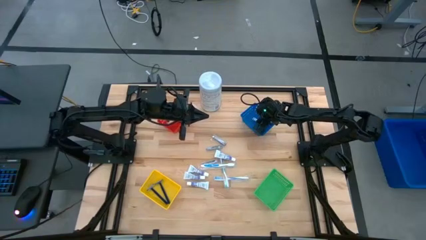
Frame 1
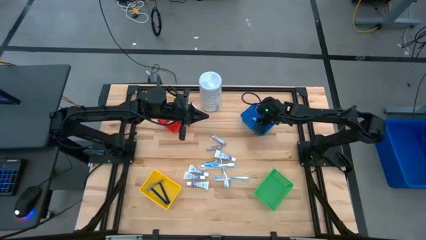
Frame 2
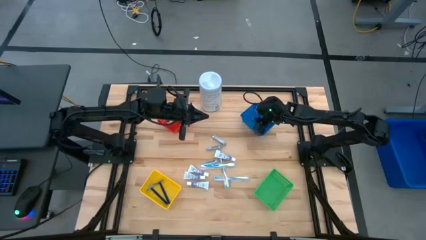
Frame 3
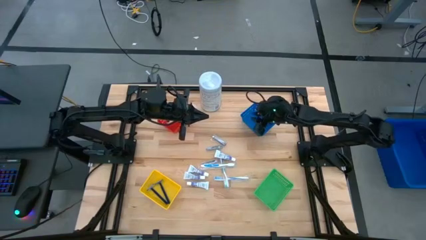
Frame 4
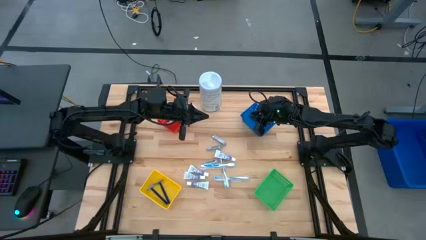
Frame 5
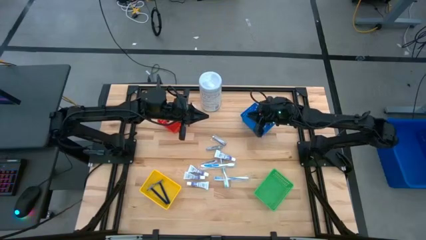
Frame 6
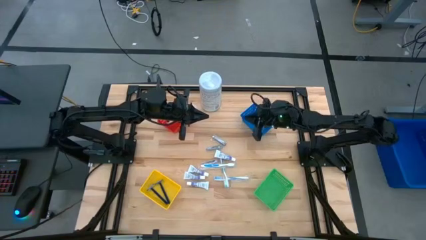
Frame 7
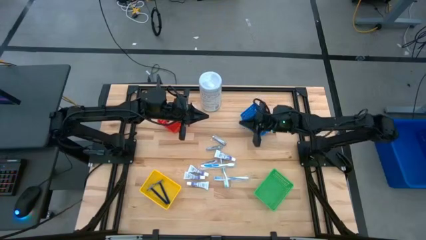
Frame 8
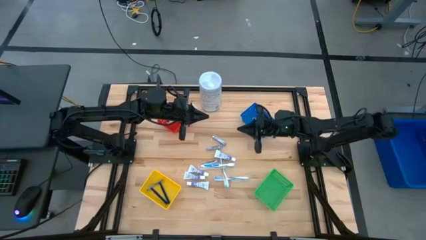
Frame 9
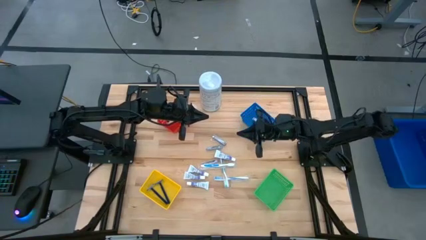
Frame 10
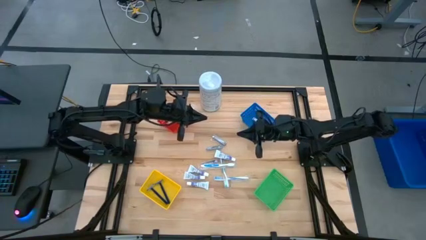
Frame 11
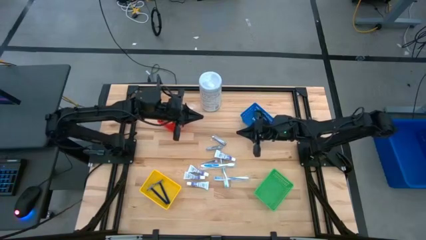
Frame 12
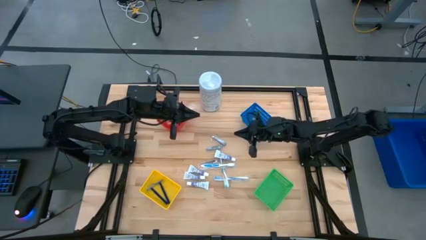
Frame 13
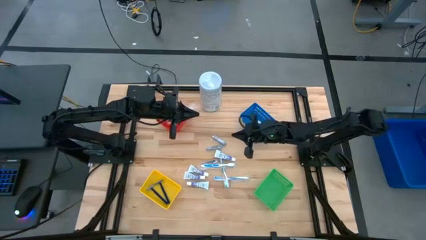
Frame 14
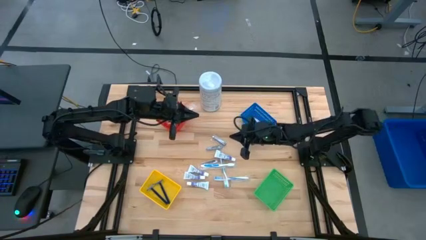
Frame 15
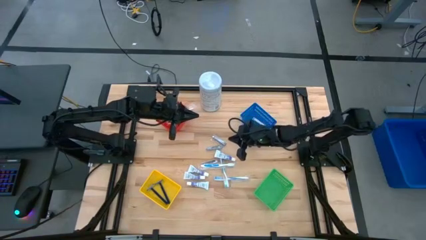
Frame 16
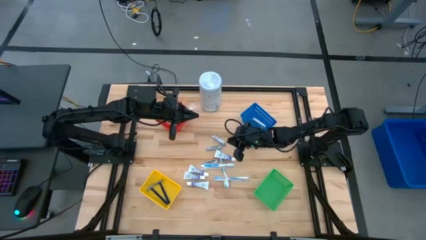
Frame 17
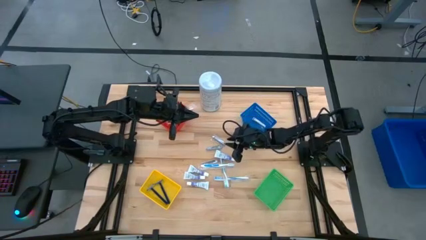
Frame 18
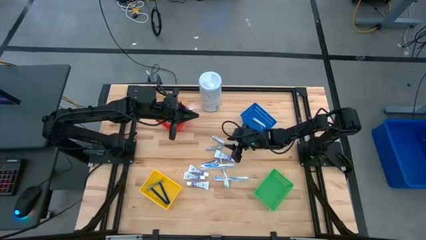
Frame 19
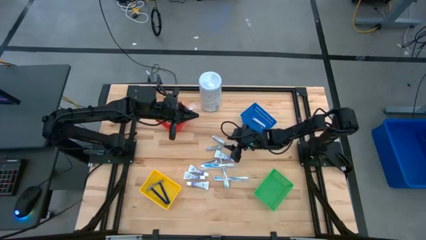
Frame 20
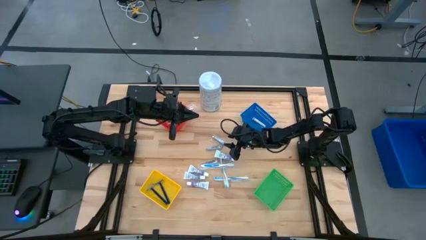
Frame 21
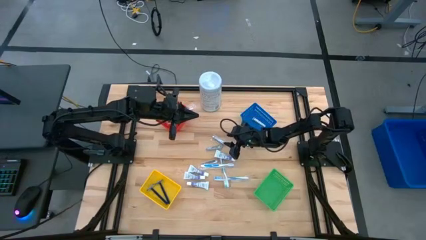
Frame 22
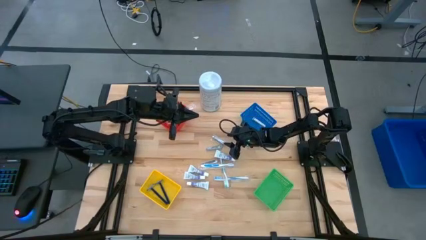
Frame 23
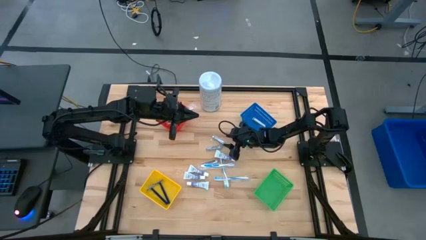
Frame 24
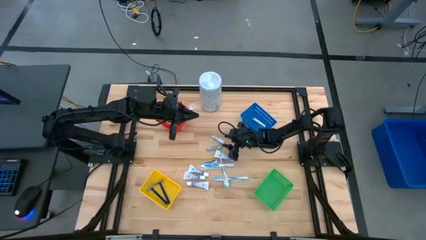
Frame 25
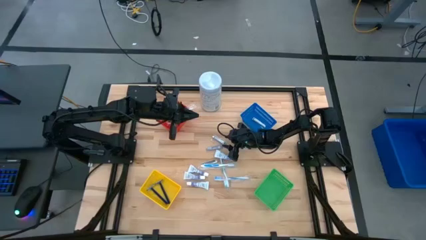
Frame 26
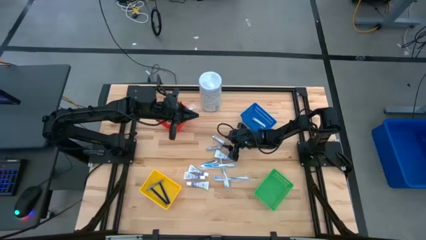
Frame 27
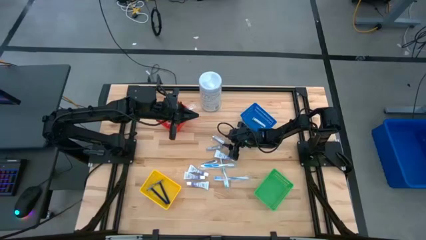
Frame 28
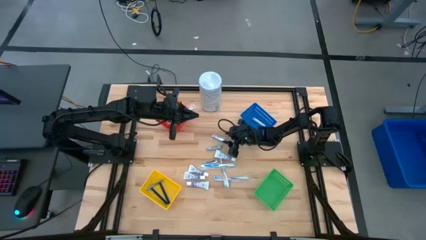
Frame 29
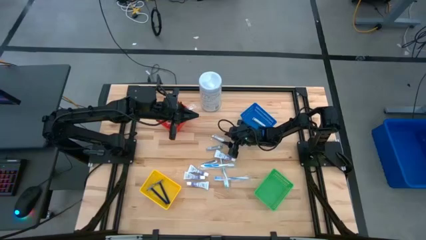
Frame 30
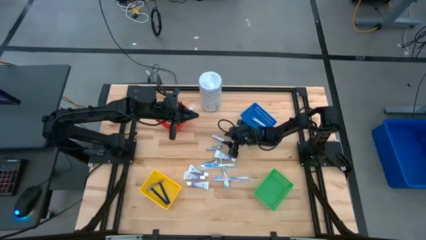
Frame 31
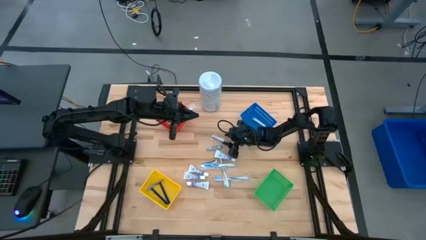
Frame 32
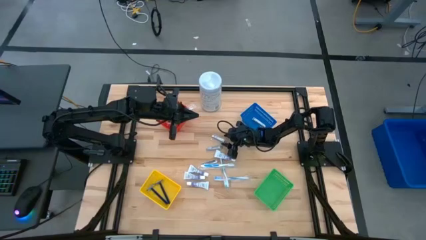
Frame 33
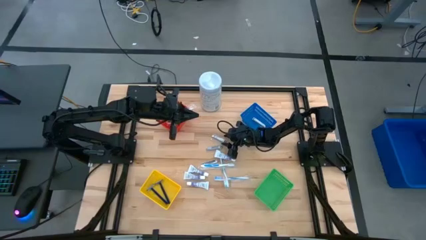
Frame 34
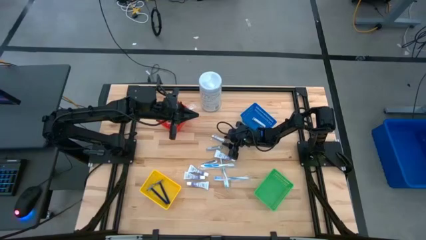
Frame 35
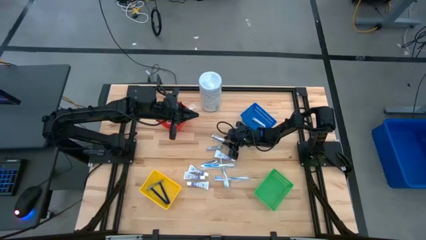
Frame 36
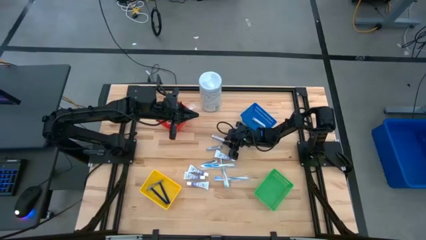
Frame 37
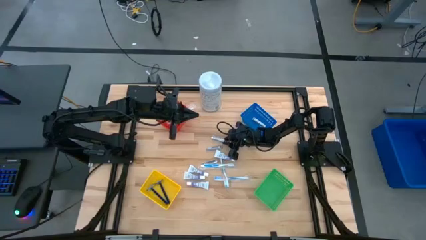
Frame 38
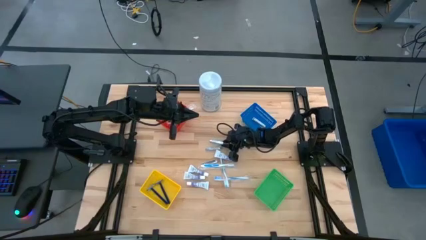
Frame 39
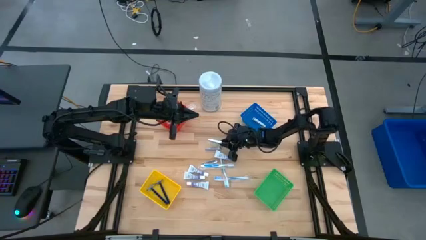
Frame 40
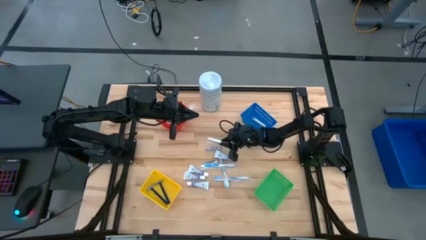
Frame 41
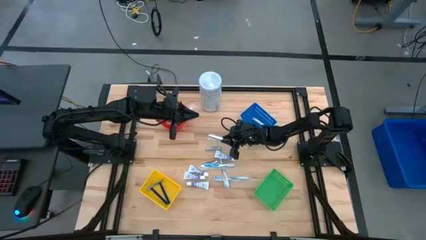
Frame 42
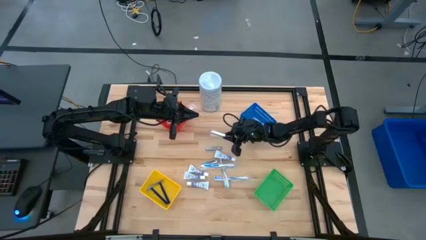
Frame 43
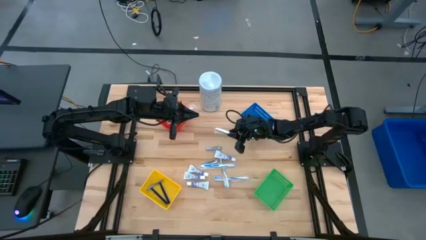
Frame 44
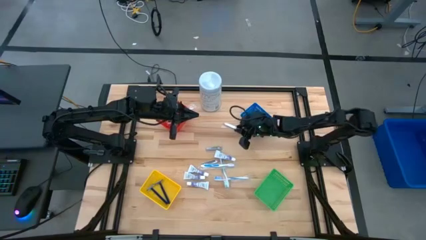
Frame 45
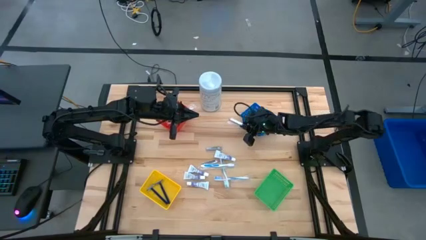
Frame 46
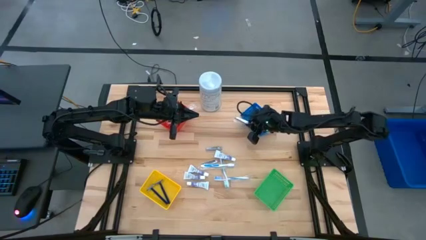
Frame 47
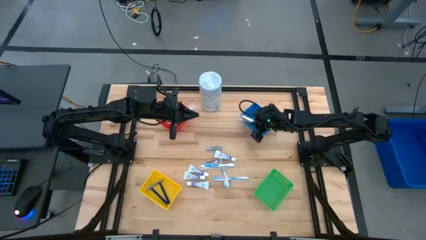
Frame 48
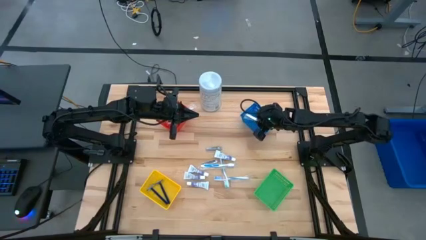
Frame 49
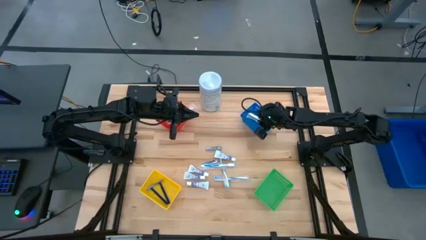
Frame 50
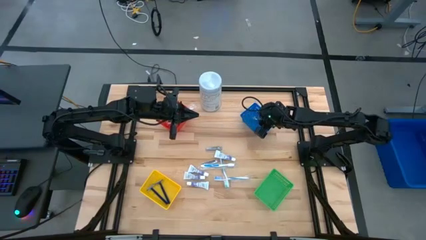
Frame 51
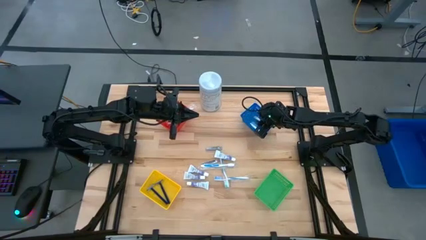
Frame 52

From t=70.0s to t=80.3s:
Task: Pick & Place Travel size toiletries
Put the silver nail clipper into the blue basket

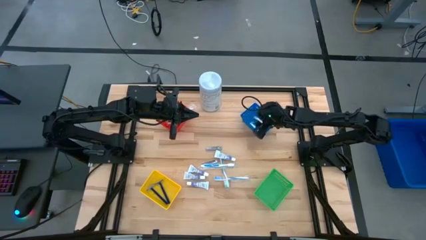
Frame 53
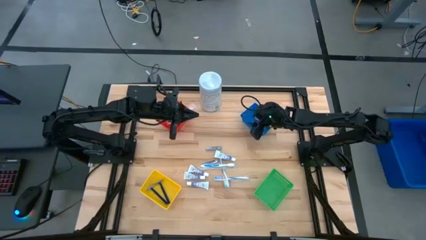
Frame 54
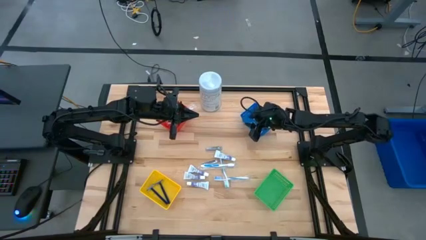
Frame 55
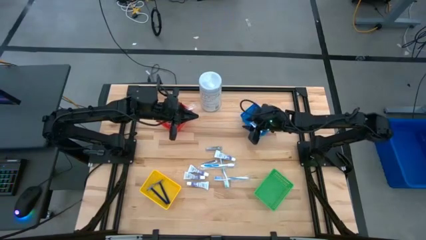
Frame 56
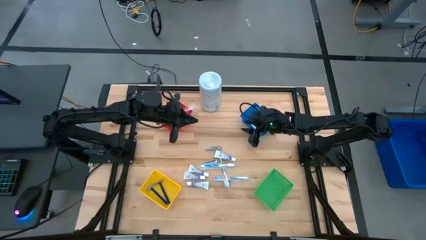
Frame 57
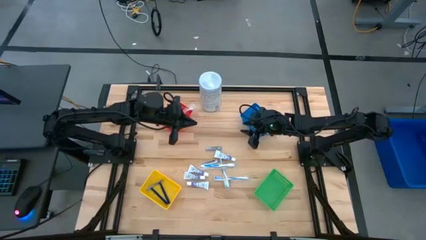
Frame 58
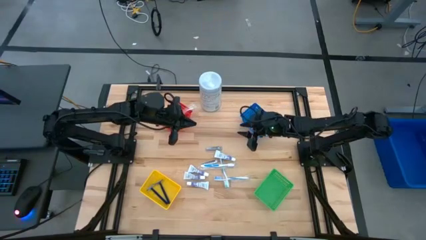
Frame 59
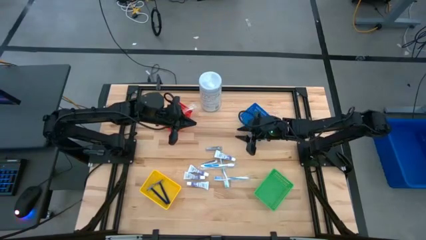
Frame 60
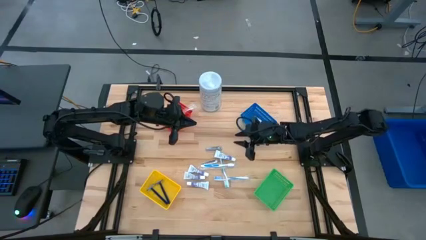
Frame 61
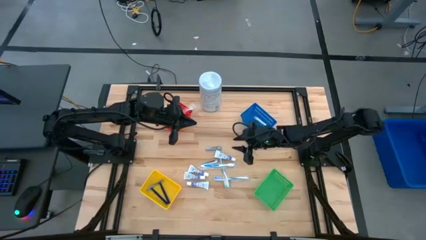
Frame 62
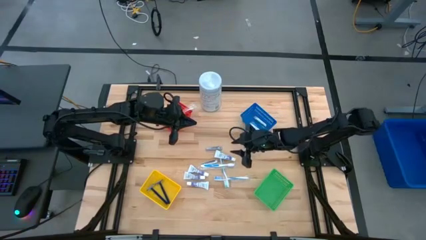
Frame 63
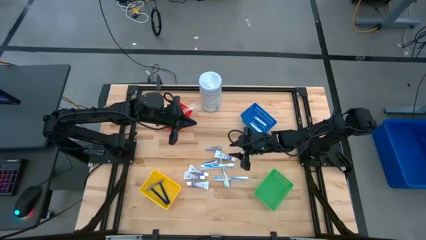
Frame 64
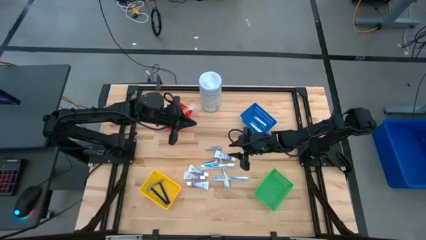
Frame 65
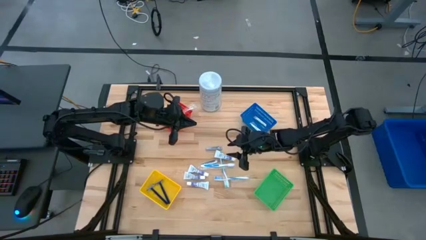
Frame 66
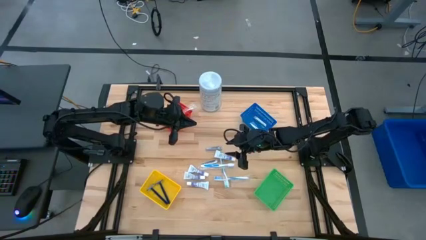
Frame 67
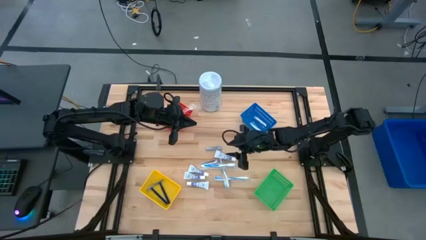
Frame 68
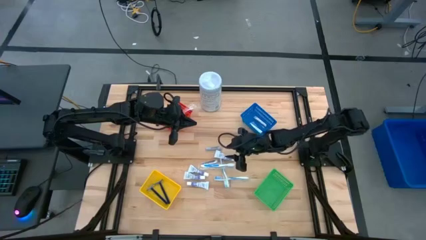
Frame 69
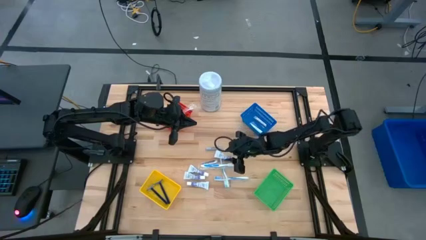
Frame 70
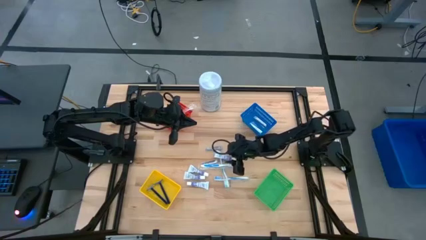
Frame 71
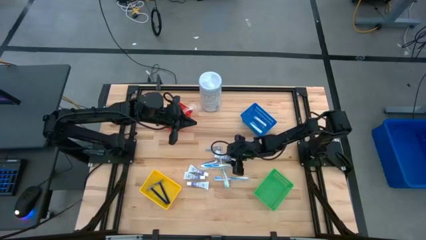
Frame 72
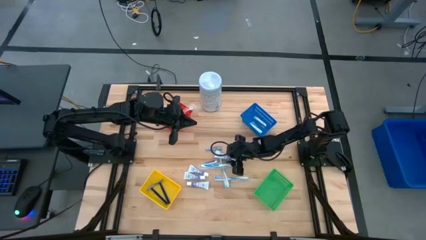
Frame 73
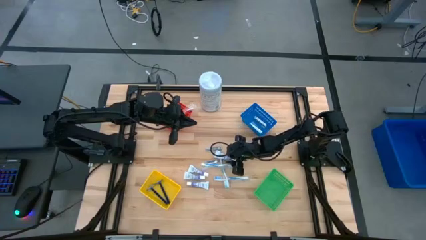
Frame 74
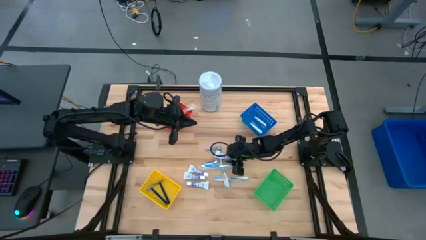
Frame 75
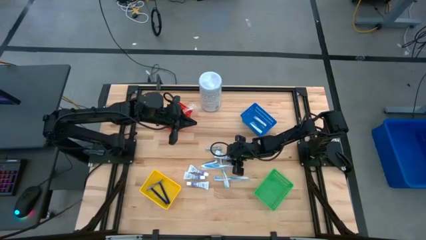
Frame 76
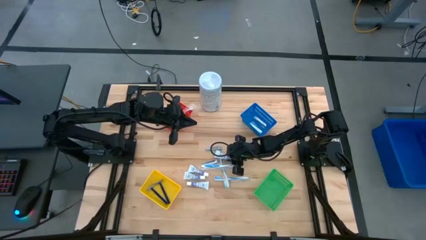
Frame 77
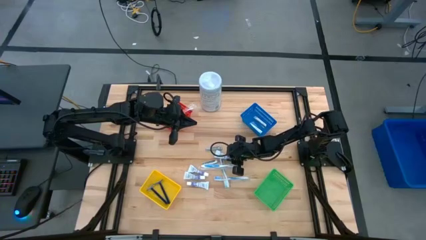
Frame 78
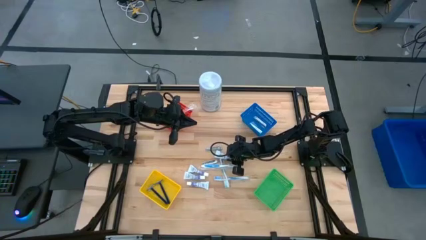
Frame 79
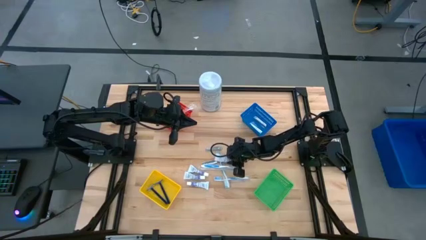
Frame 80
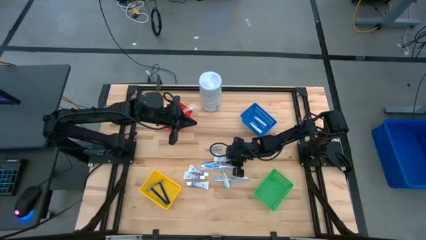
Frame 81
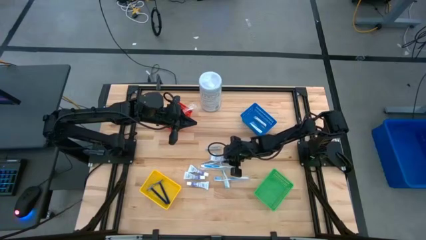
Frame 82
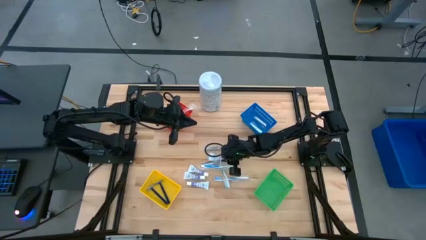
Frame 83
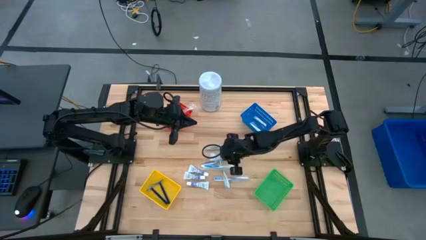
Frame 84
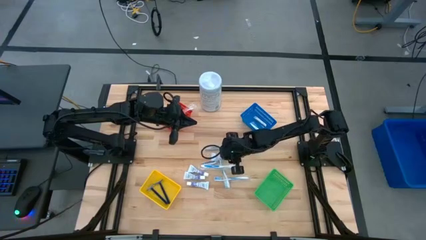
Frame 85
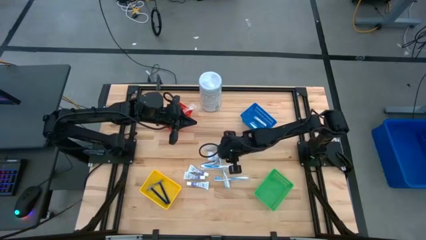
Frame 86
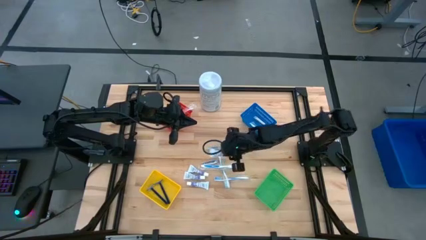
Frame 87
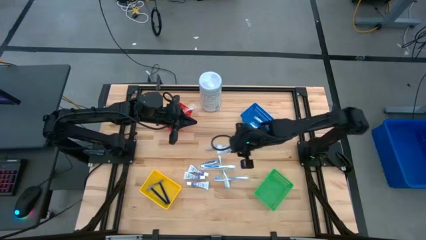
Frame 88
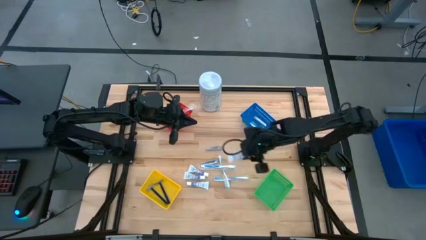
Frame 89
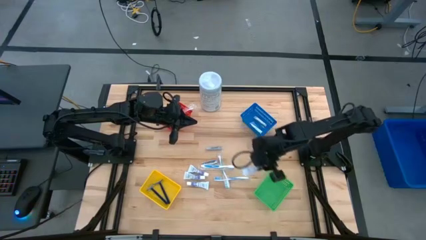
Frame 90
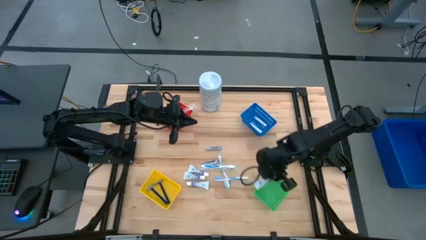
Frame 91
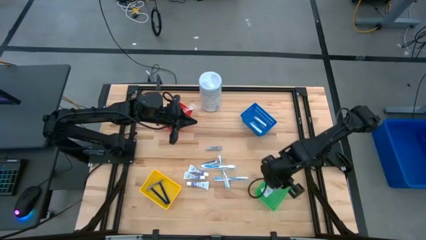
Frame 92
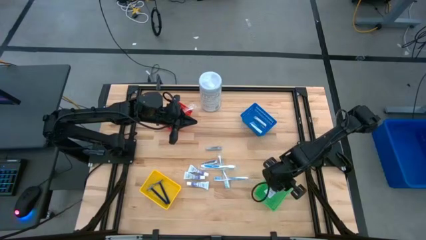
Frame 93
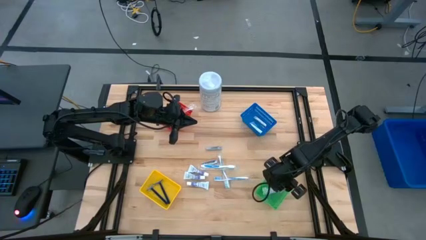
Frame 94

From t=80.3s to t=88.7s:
Put the white toothpaste into the green basket
